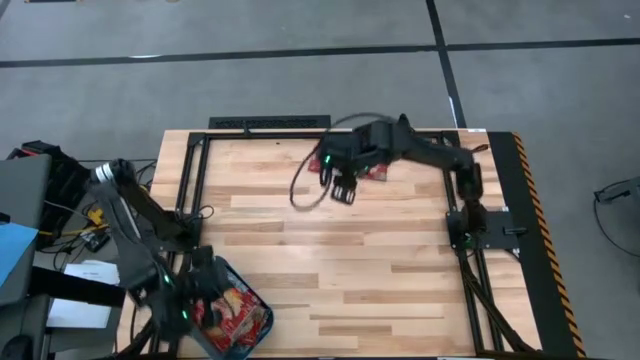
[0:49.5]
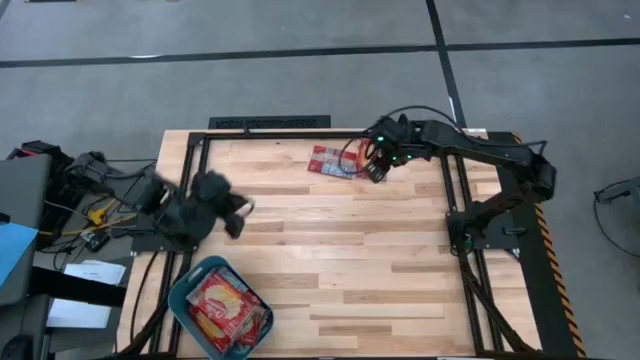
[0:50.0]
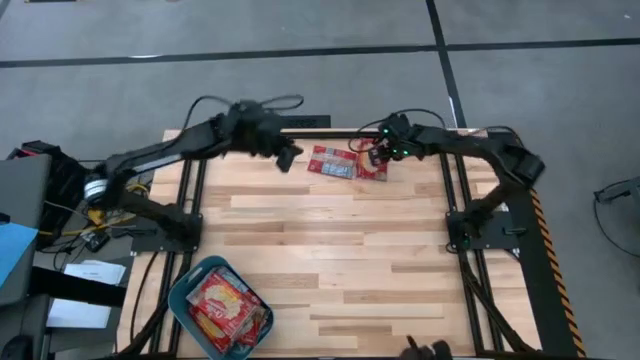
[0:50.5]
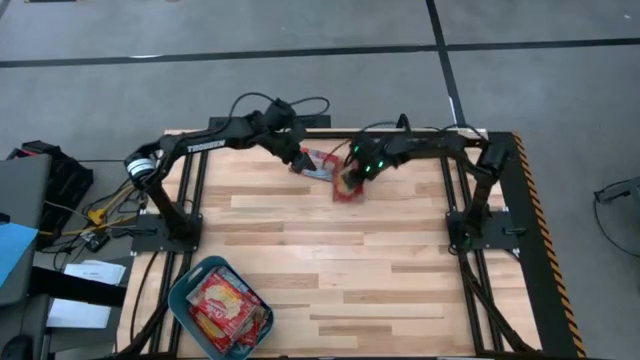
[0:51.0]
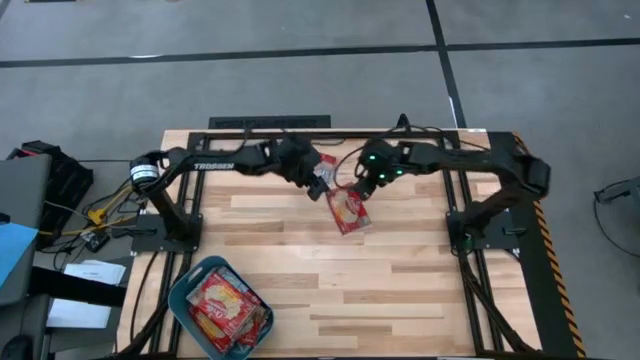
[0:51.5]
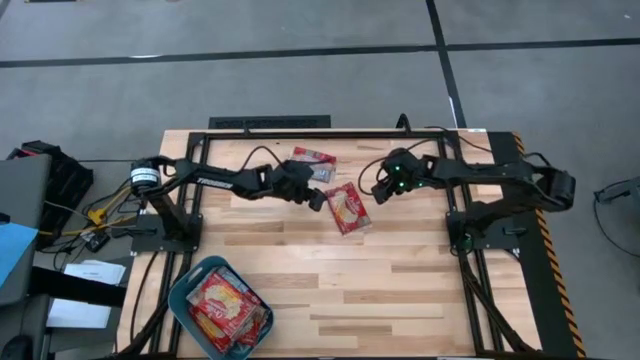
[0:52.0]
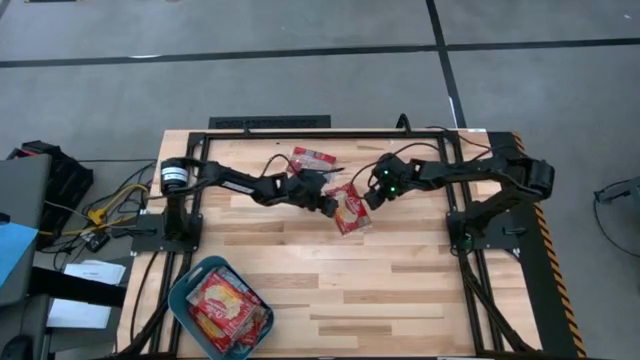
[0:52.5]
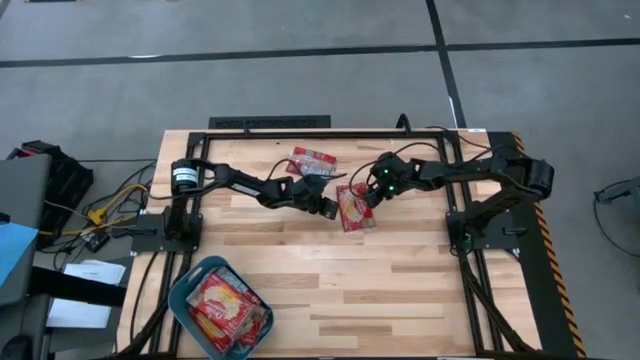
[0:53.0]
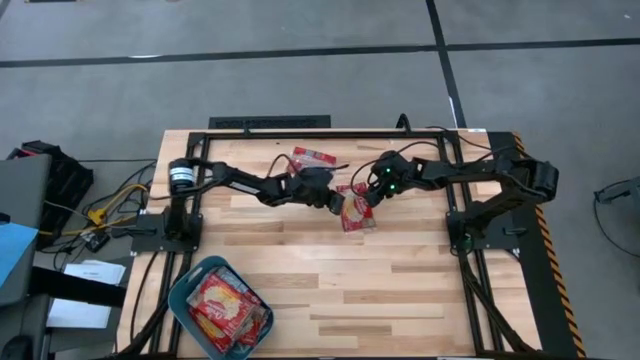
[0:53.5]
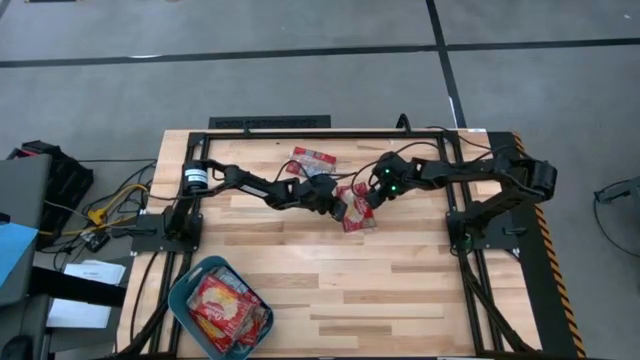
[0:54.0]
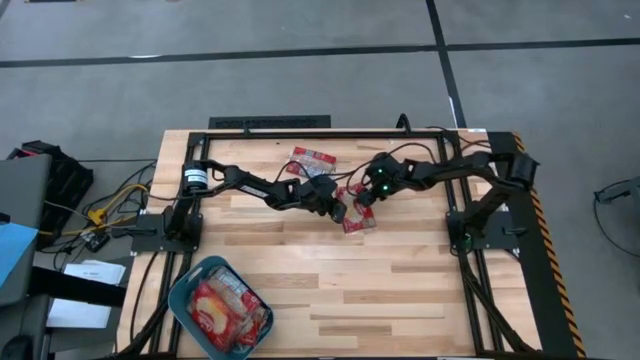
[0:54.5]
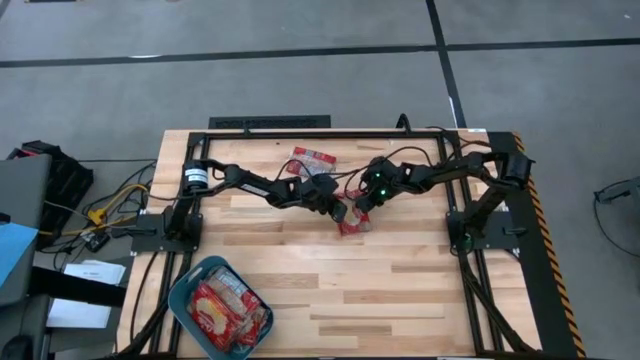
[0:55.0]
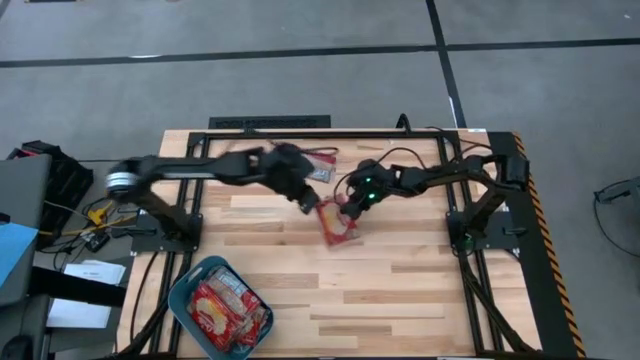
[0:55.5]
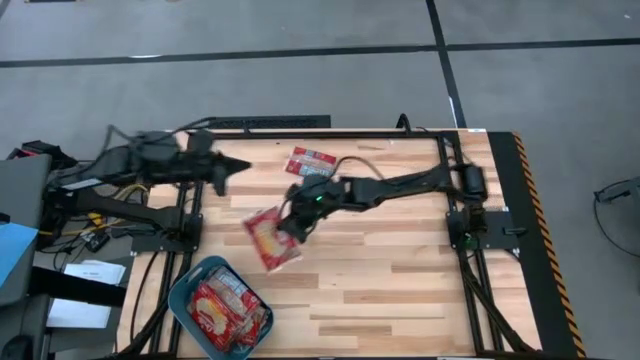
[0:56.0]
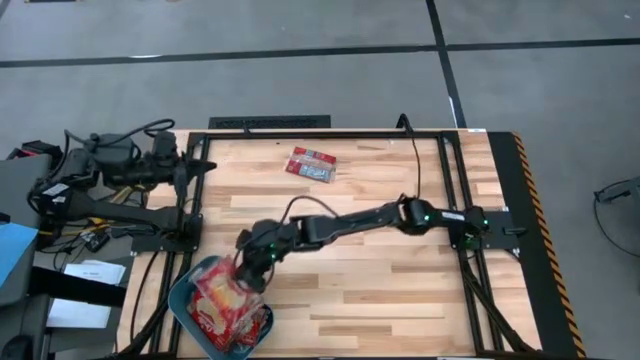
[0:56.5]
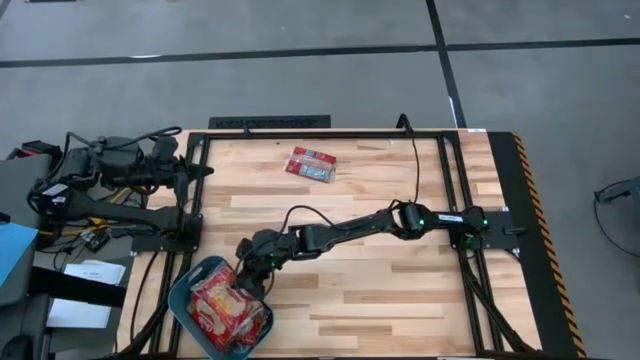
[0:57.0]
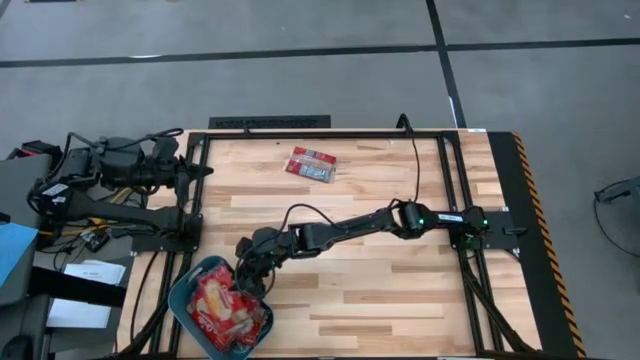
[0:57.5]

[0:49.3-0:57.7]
Task: Sort popcorn bags into baskets
Put the red popcorn pack into the blue bin

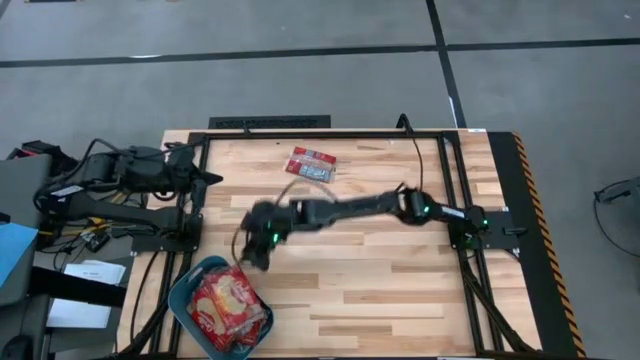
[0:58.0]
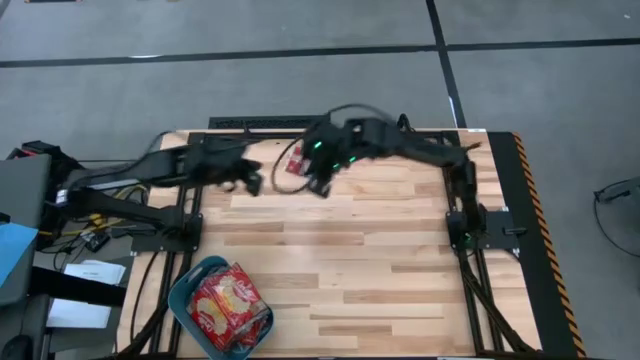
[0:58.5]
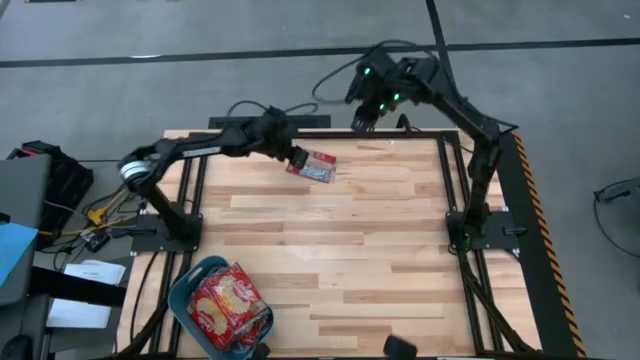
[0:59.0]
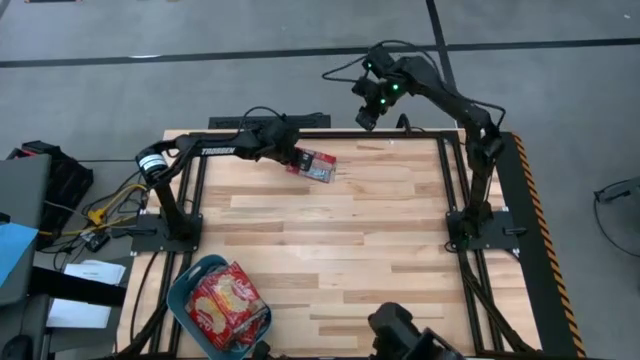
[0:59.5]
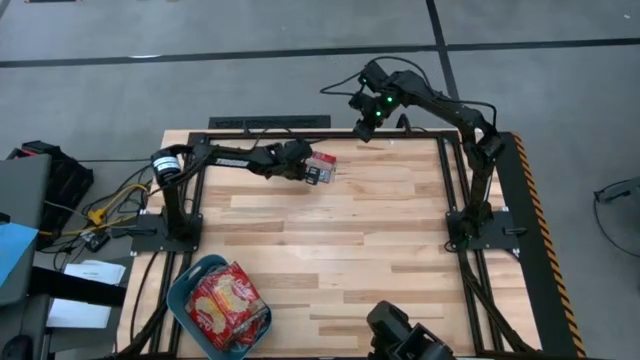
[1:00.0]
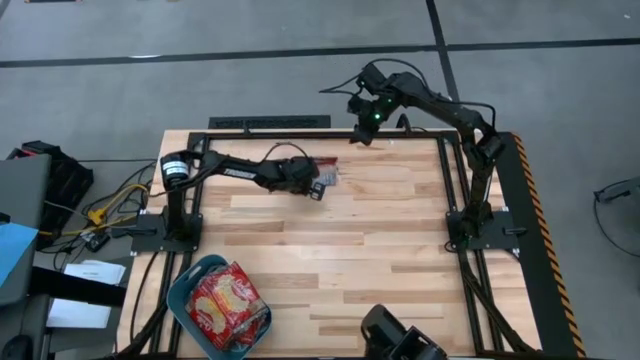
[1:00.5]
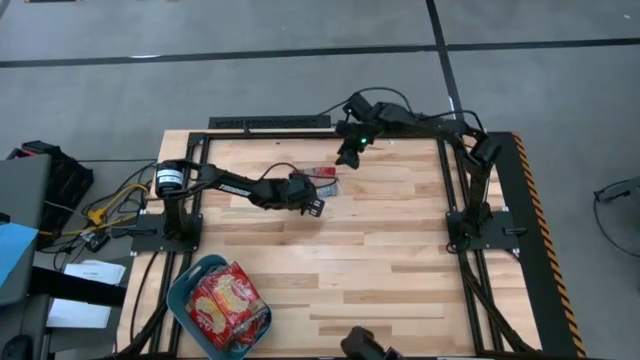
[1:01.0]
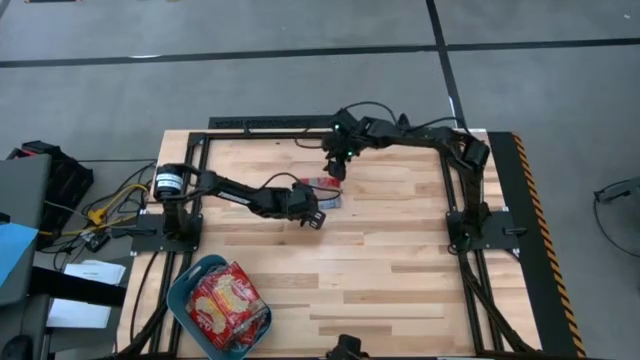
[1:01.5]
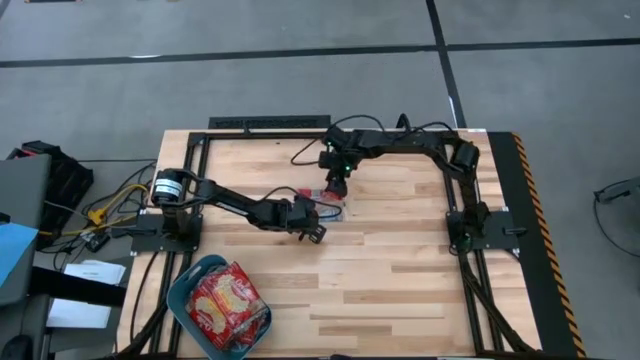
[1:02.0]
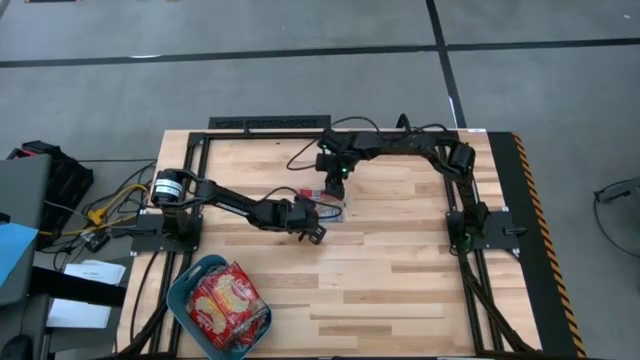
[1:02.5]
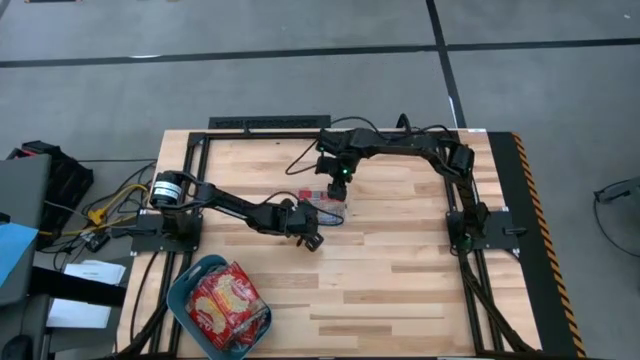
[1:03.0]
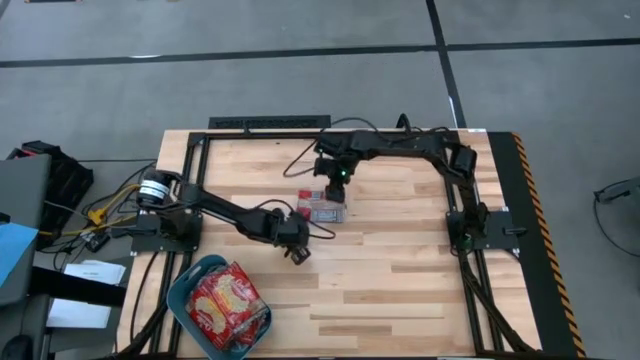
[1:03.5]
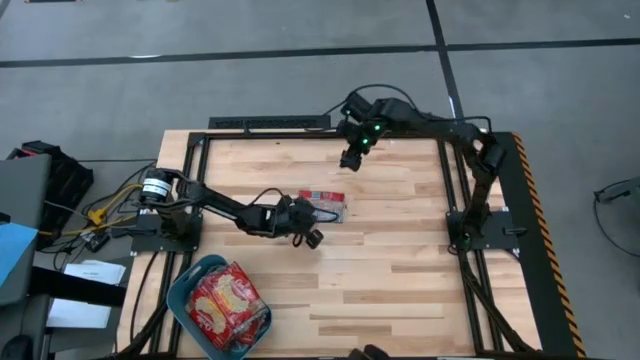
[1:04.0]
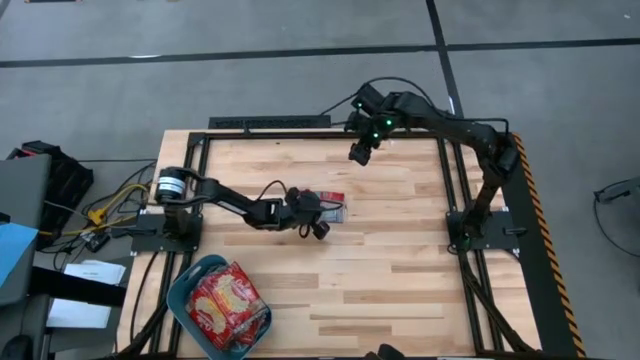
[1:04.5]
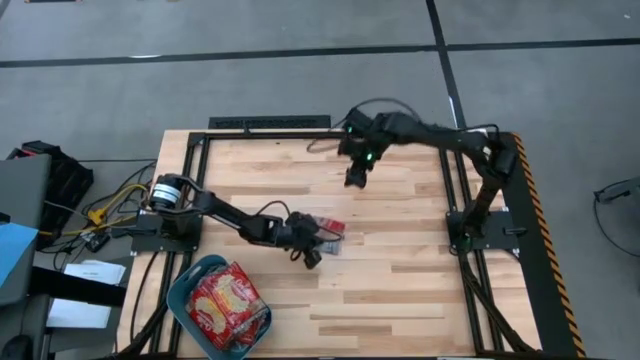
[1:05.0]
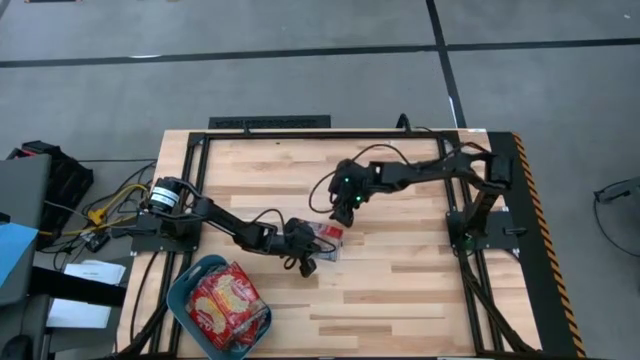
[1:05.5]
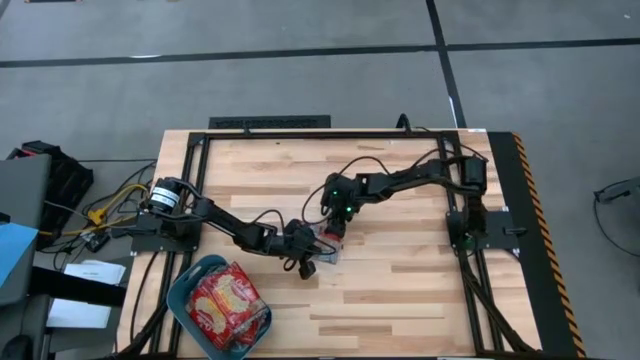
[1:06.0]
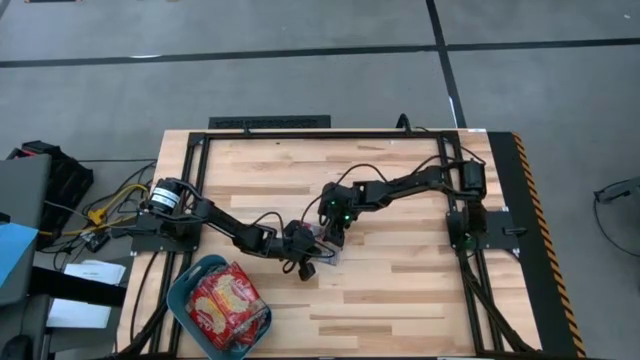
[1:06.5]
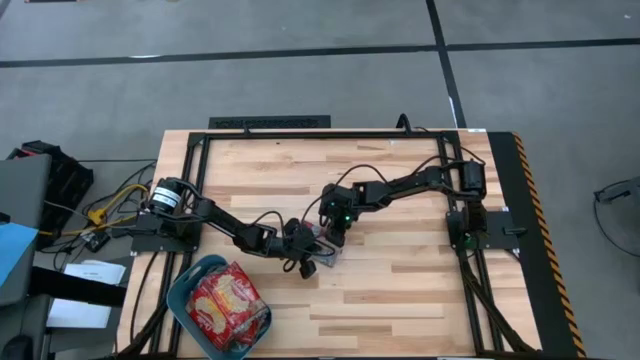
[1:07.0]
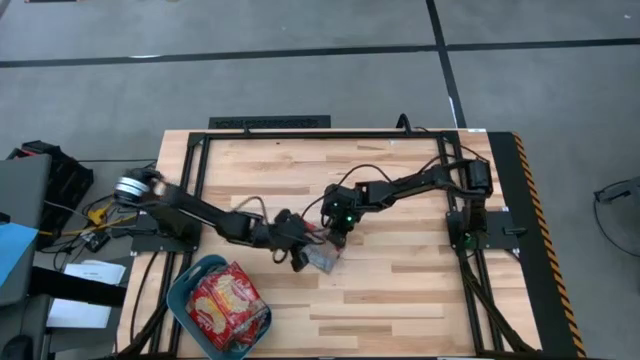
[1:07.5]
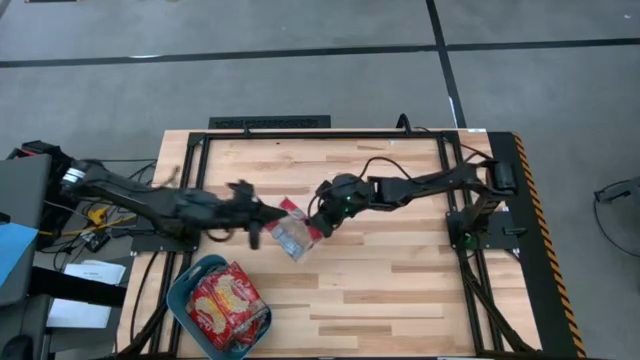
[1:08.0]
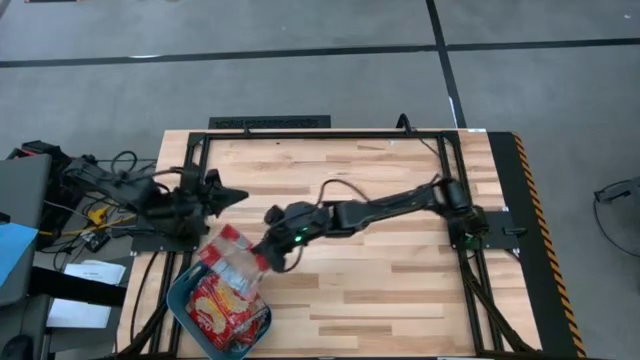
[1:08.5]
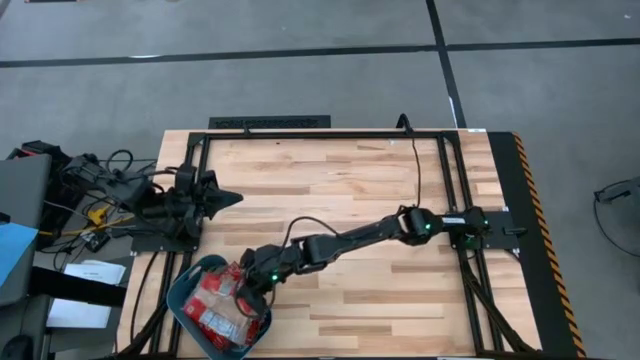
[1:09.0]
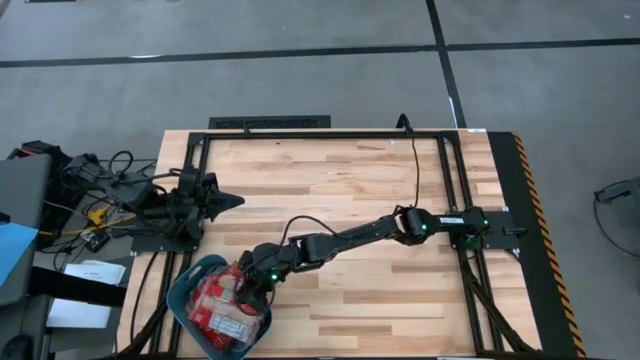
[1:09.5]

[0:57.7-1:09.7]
Put the red popcorn pack into the blue bin

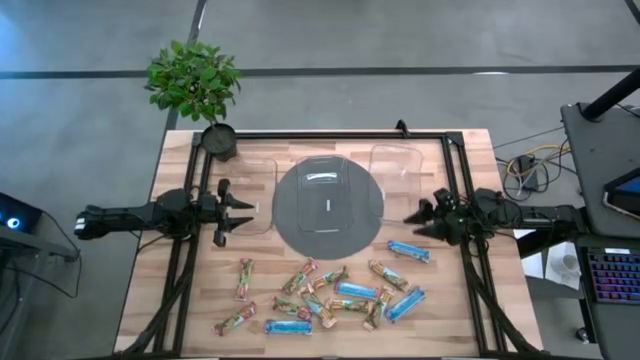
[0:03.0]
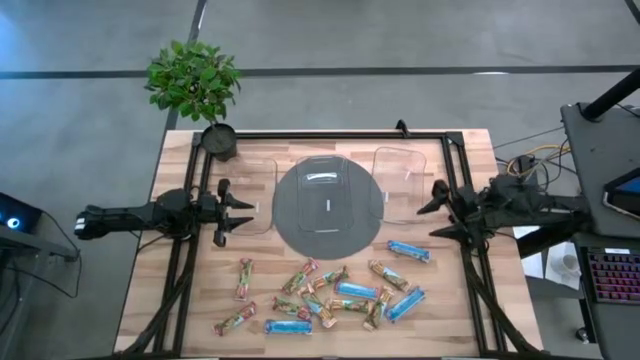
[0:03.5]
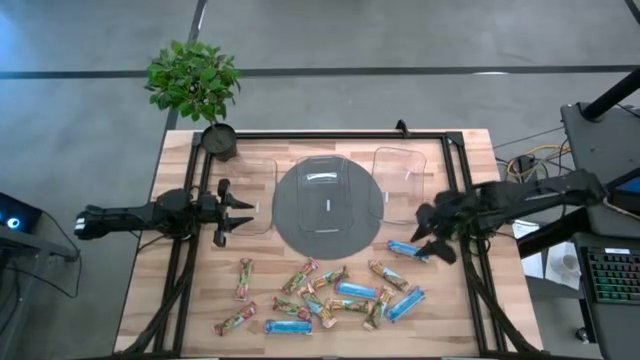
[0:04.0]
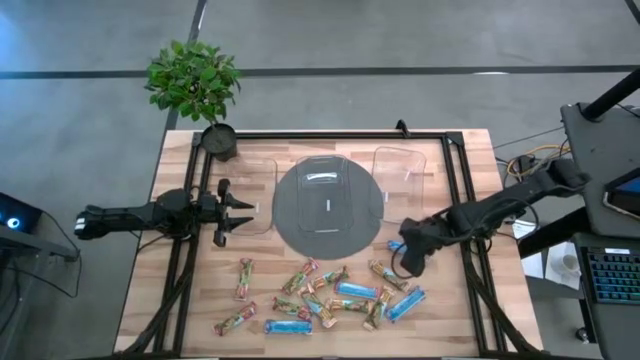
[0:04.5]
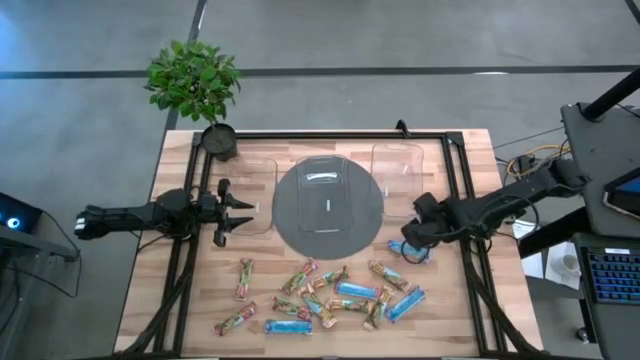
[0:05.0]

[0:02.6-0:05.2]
Task: Pick and place Granola Bars by type
Adjust the right transparent bin
